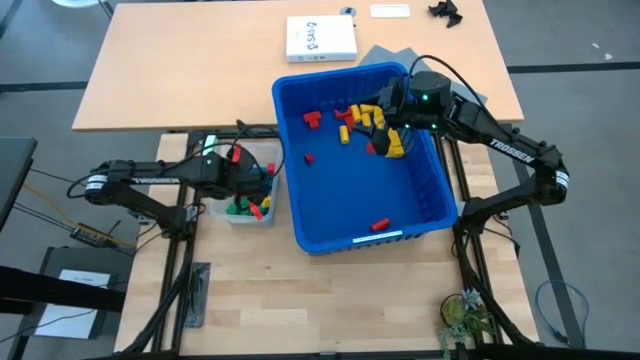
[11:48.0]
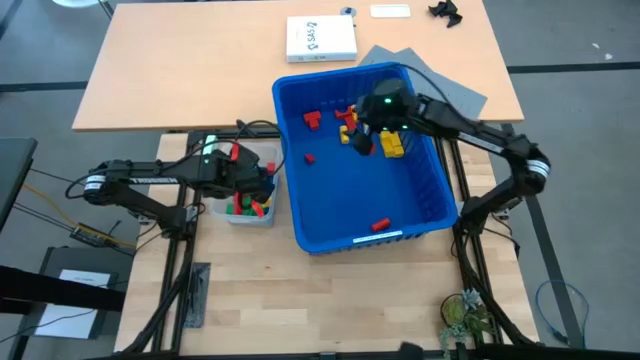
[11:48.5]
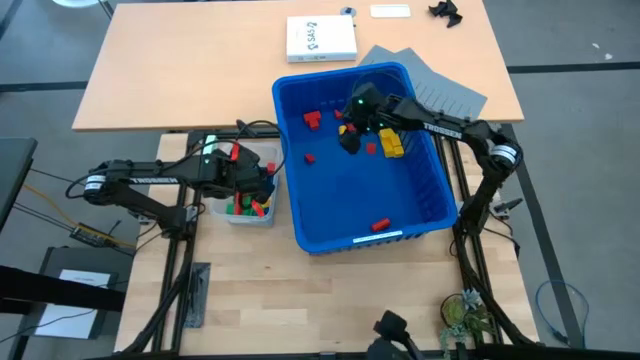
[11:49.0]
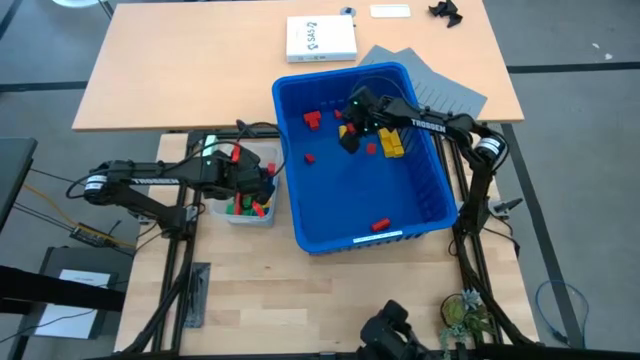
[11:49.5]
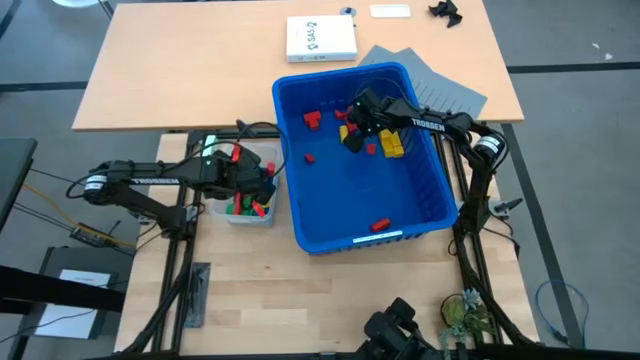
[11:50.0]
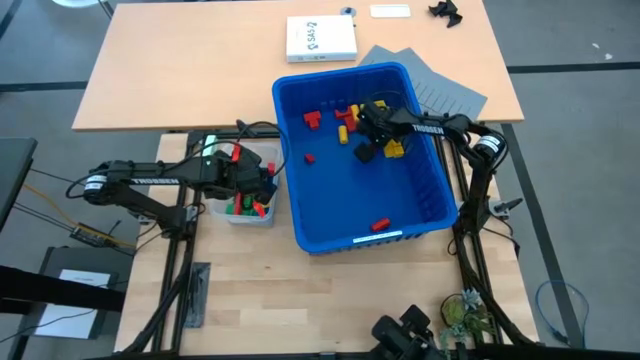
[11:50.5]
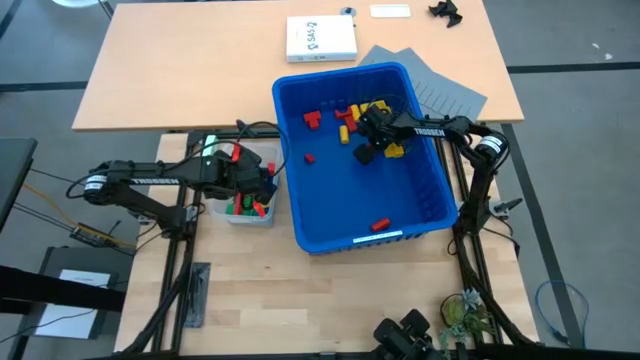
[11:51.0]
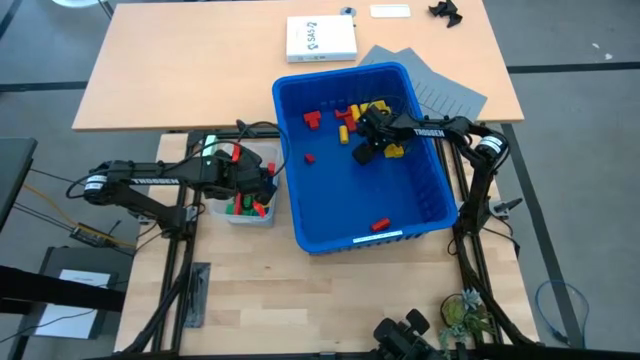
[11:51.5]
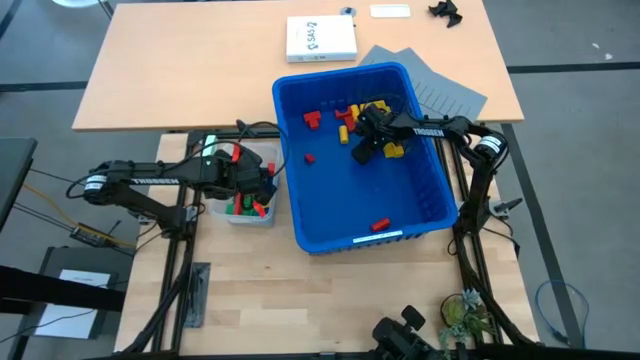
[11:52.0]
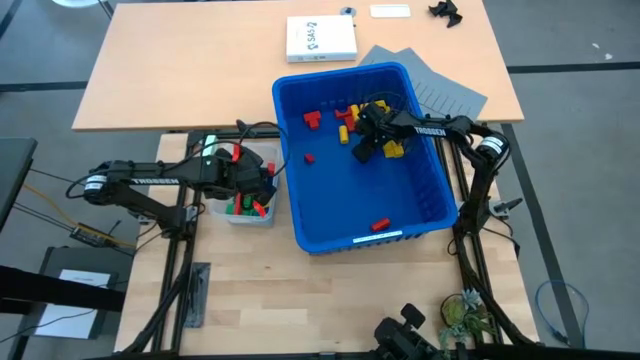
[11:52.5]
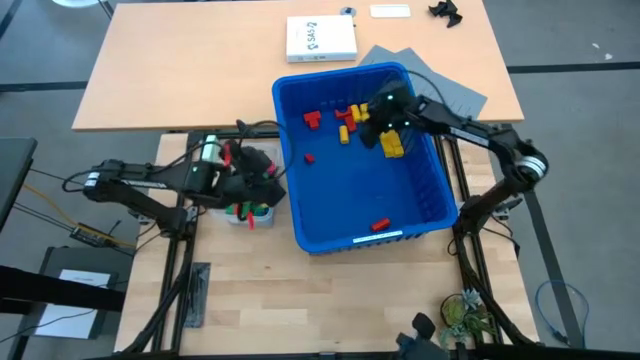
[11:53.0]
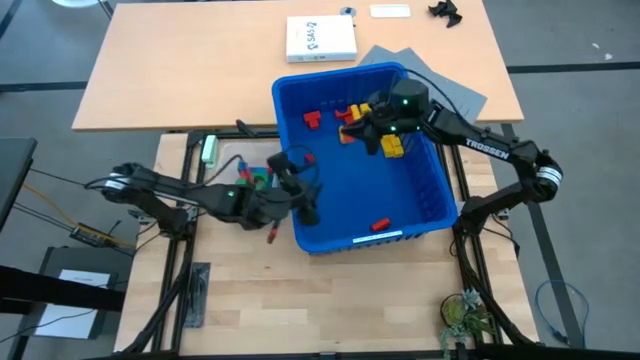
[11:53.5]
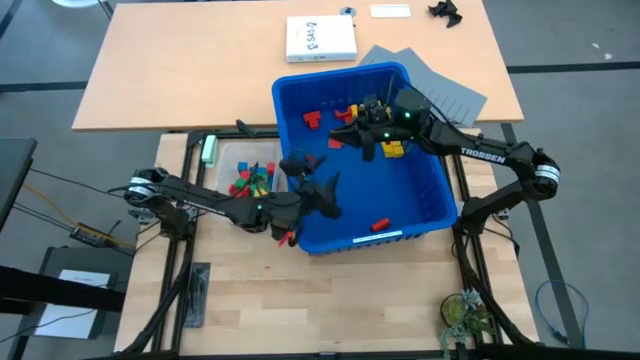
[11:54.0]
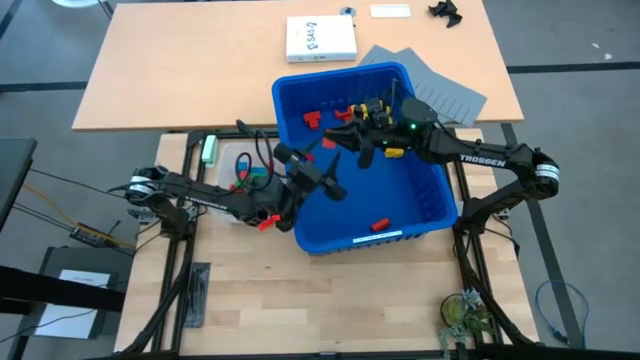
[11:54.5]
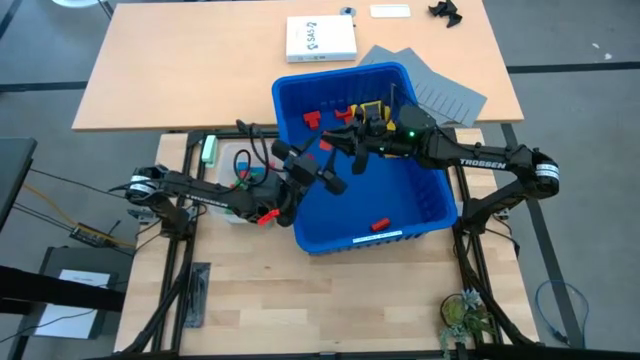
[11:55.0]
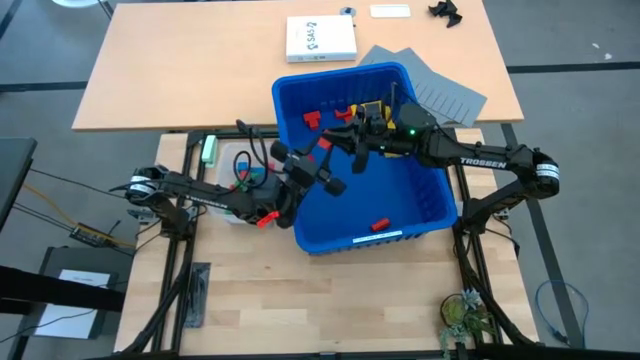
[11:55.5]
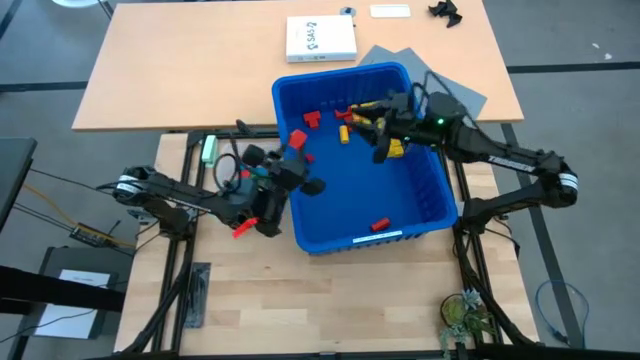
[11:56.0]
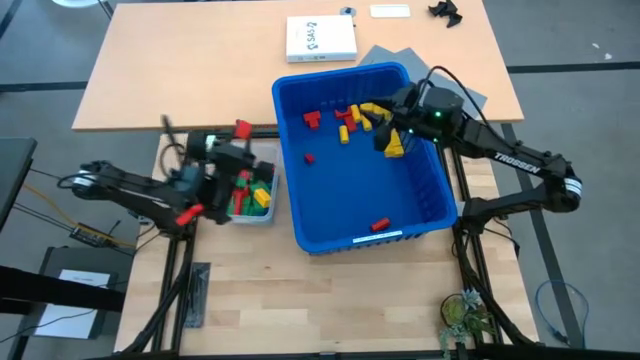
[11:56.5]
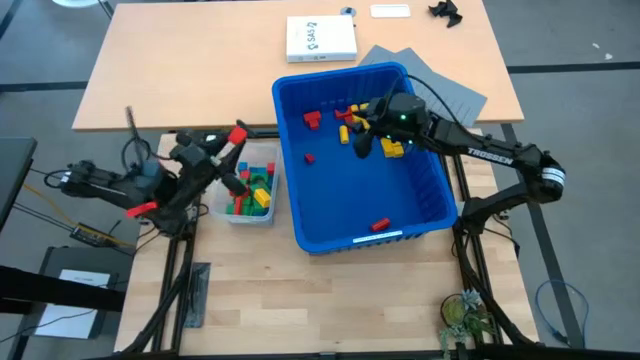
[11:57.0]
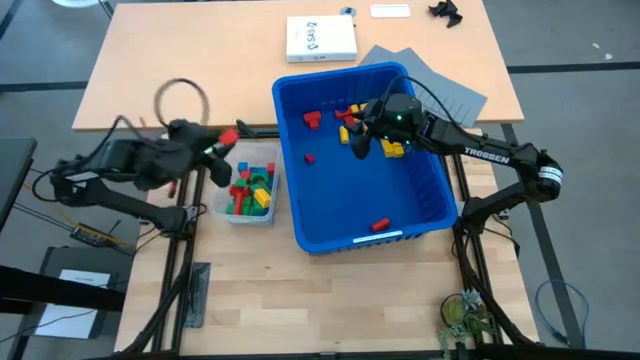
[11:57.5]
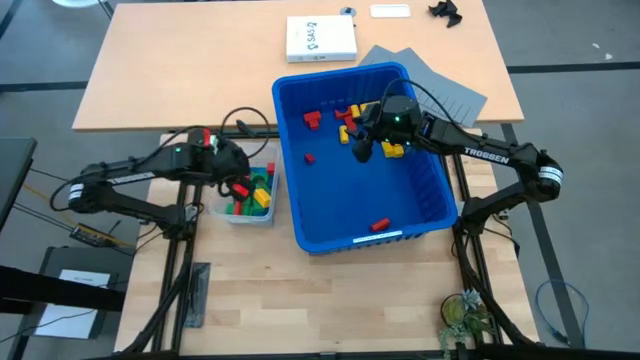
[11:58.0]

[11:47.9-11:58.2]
Task: Sort blocks
Put the red block into the transparent bin

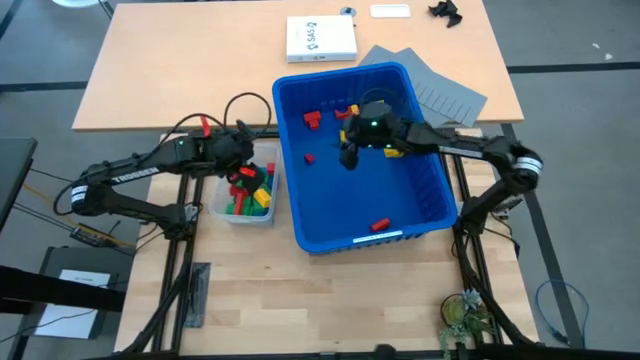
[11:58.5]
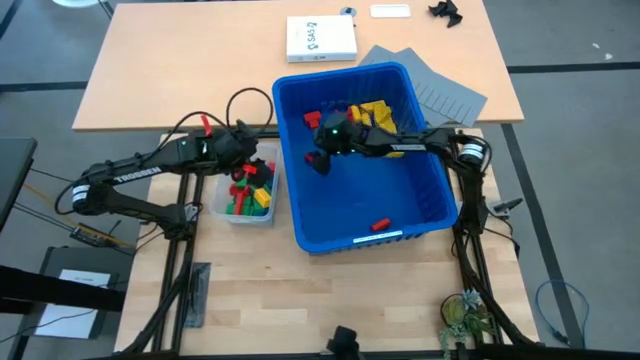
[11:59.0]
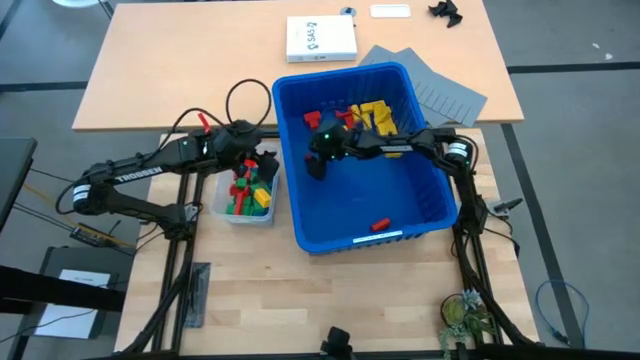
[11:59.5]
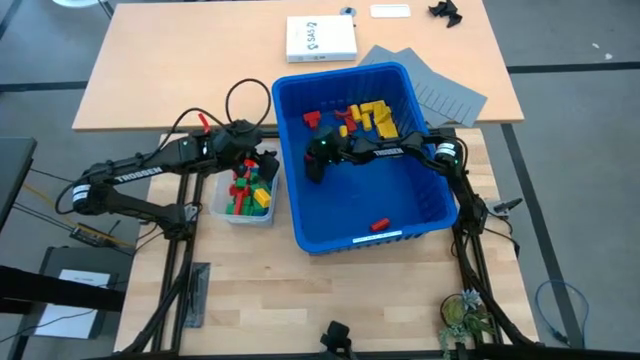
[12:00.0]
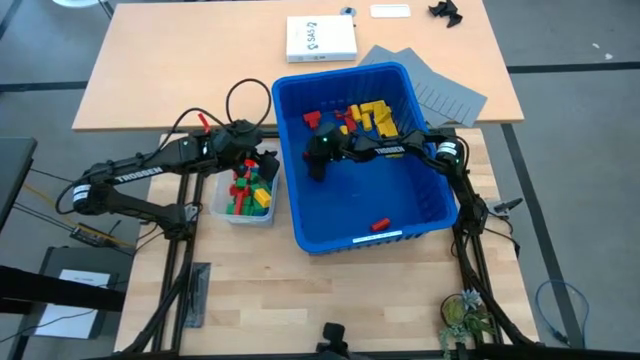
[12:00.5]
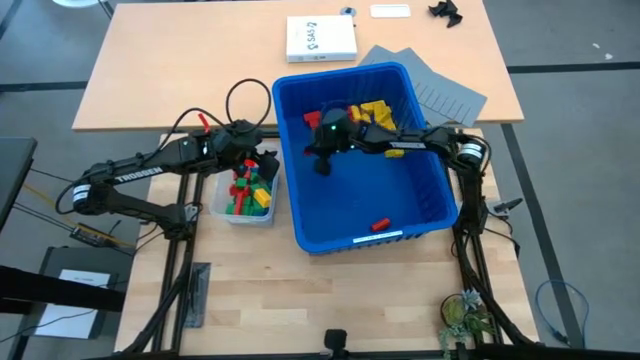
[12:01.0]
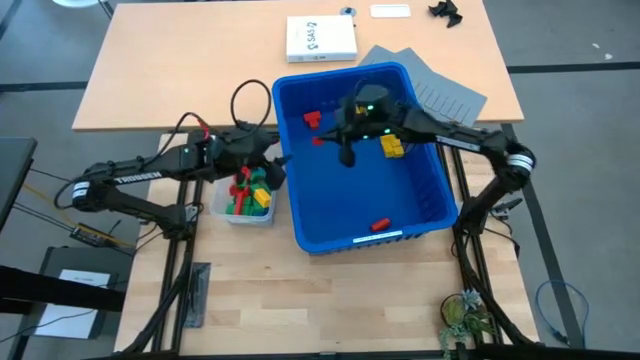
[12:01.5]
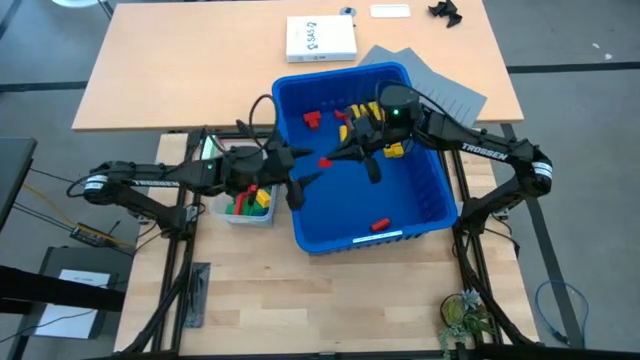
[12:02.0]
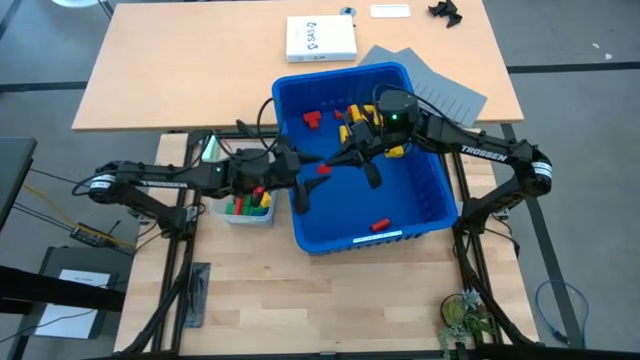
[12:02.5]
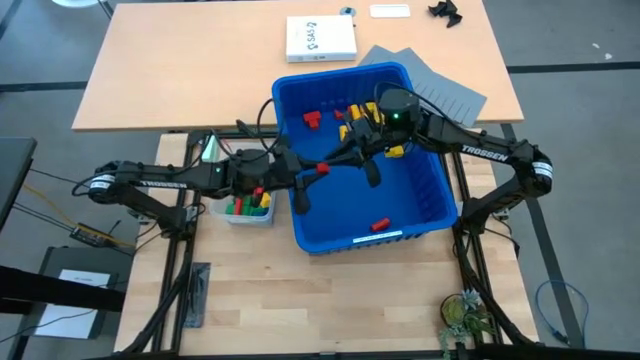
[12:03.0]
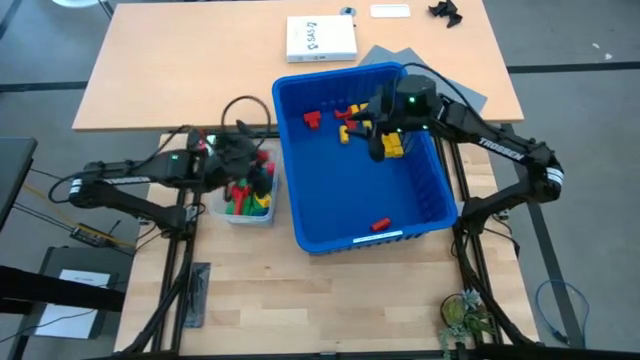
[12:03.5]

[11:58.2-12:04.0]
Put the red block into the transparent bin

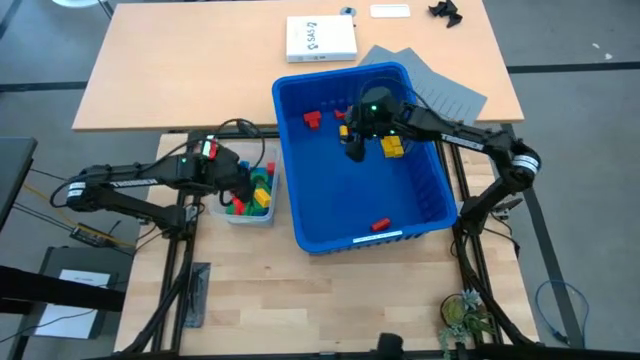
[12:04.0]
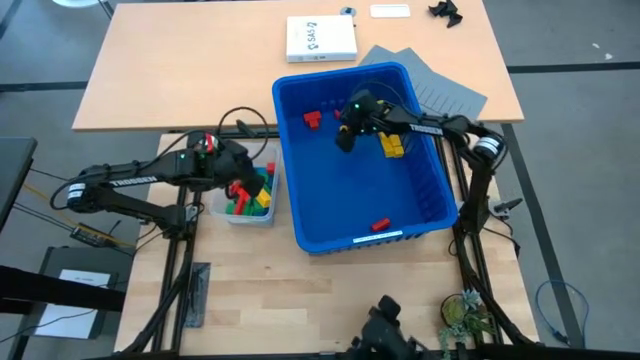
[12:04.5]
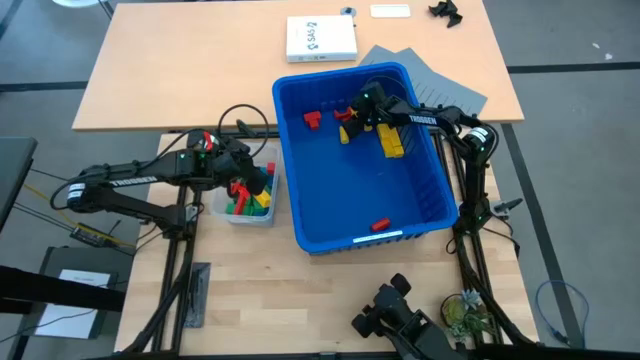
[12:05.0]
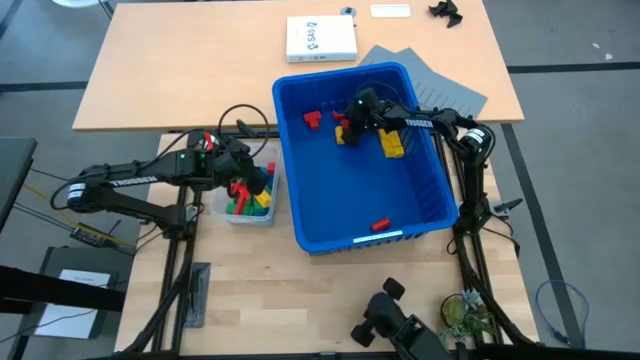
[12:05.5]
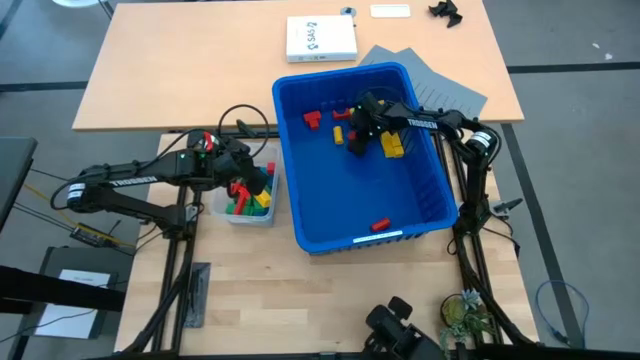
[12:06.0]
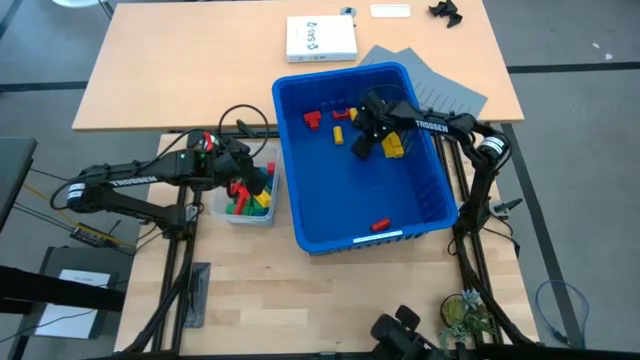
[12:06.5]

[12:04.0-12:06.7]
Put the red block into the transparent bin

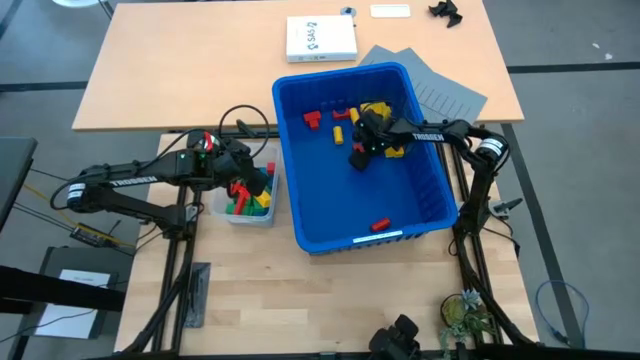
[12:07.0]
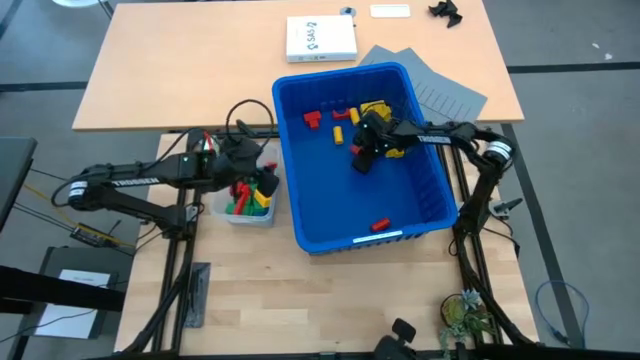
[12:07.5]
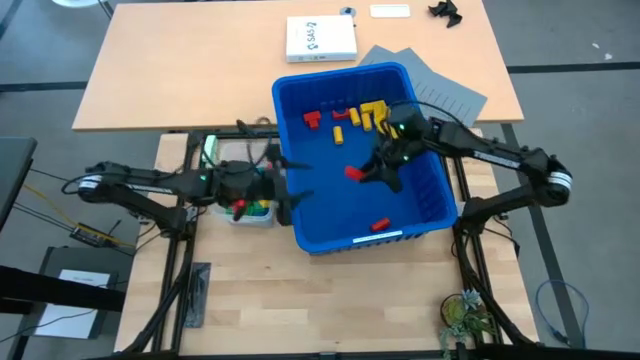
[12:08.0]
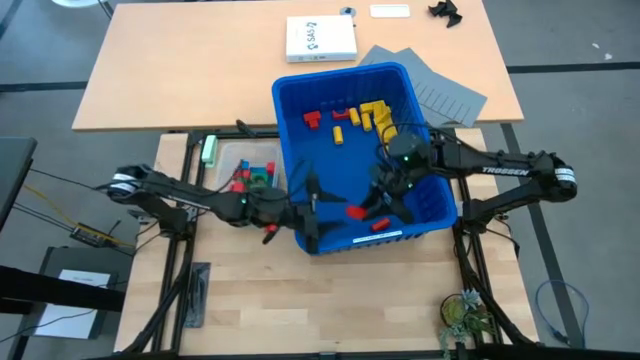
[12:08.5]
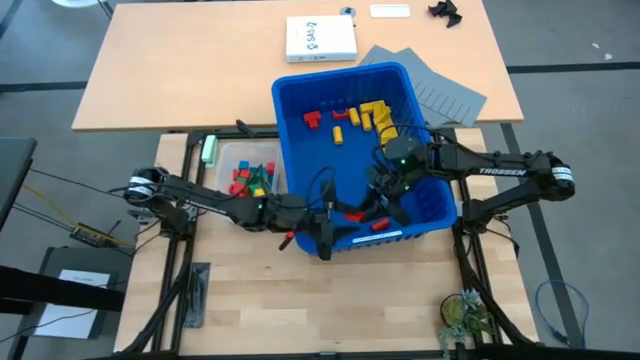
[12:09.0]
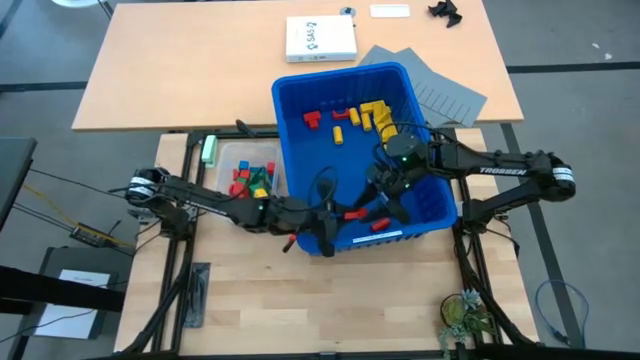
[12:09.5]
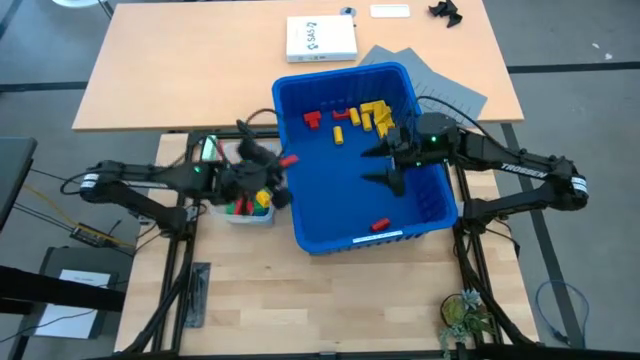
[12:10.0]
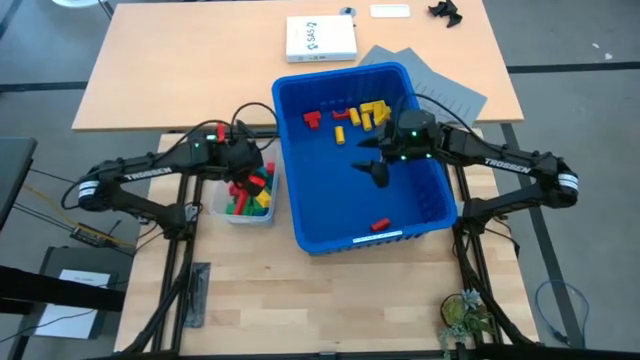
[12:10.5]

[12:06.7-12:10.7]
Put the red block into the transparent bin
